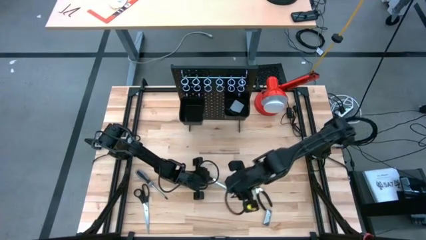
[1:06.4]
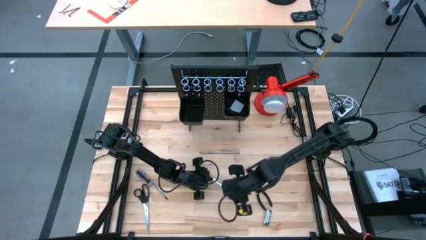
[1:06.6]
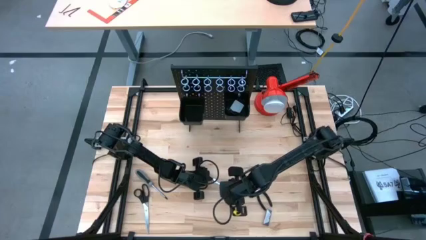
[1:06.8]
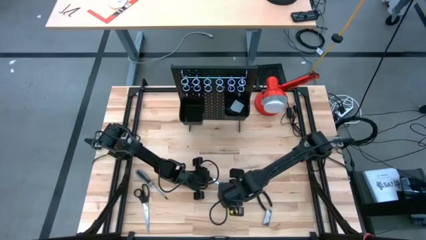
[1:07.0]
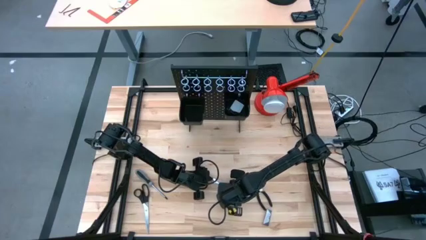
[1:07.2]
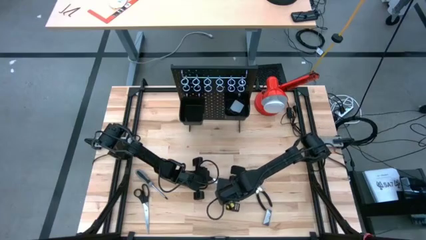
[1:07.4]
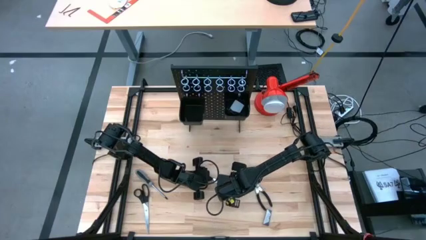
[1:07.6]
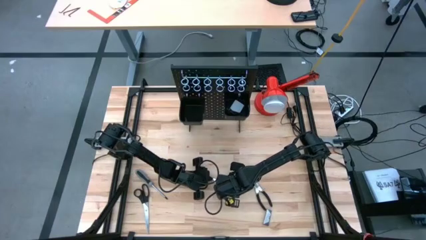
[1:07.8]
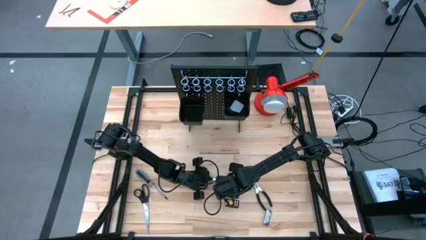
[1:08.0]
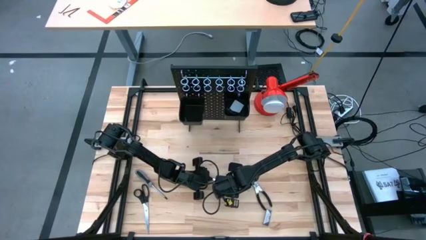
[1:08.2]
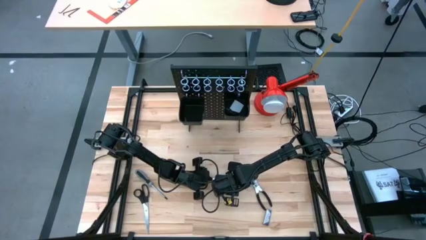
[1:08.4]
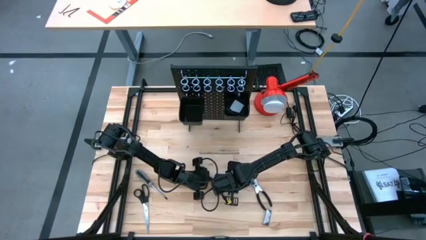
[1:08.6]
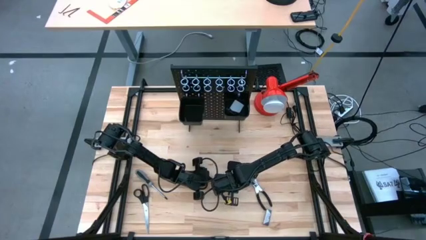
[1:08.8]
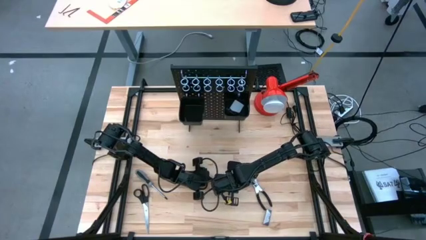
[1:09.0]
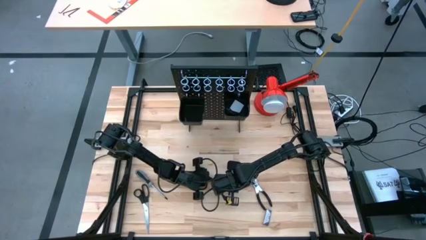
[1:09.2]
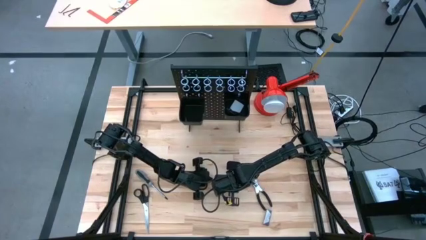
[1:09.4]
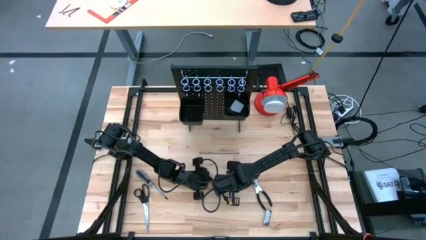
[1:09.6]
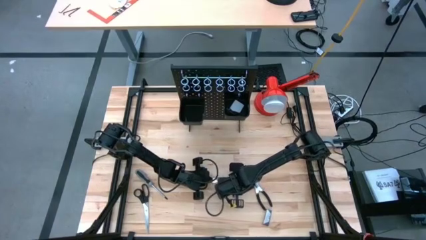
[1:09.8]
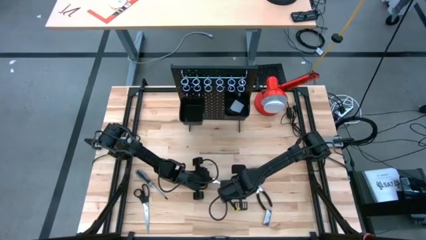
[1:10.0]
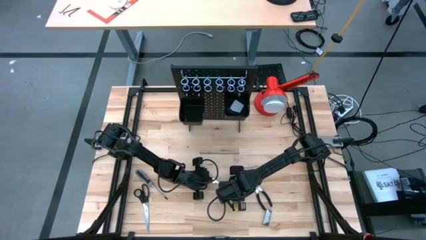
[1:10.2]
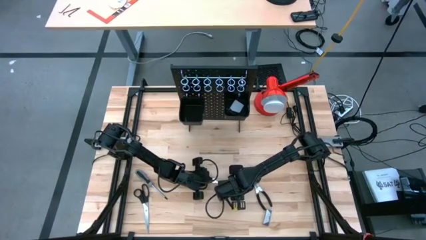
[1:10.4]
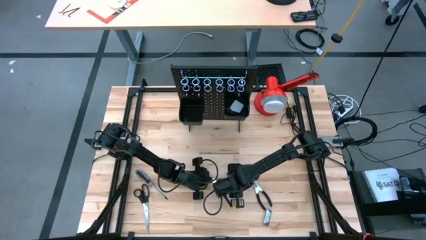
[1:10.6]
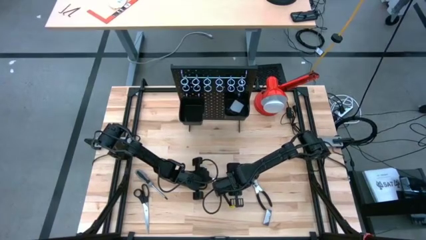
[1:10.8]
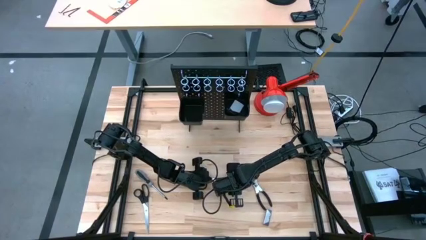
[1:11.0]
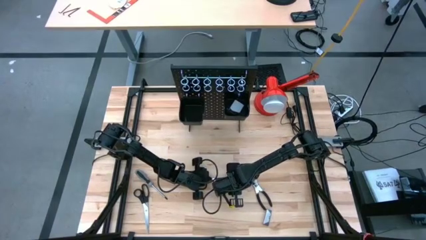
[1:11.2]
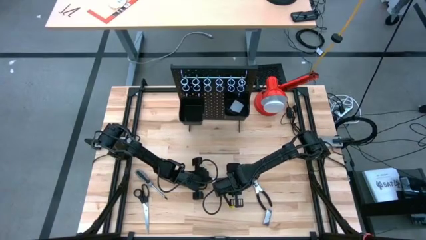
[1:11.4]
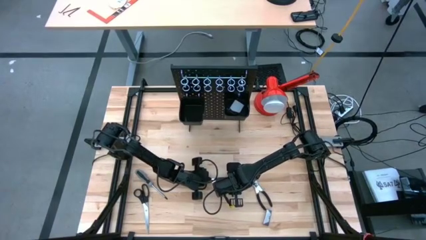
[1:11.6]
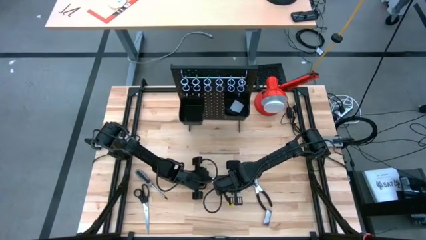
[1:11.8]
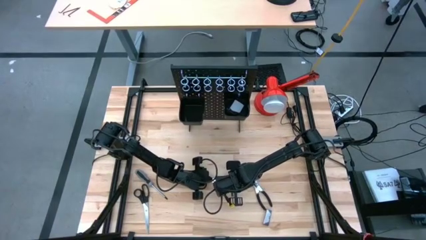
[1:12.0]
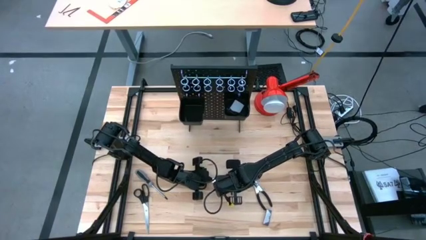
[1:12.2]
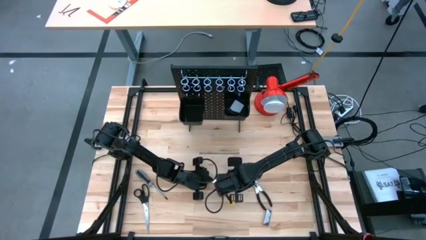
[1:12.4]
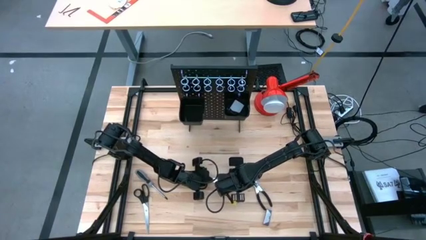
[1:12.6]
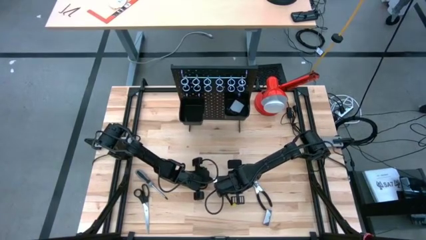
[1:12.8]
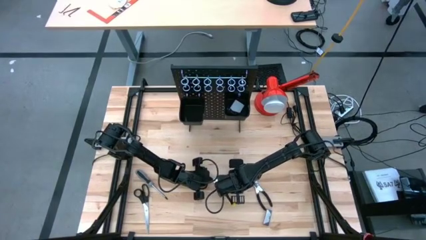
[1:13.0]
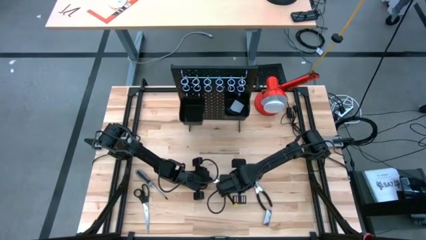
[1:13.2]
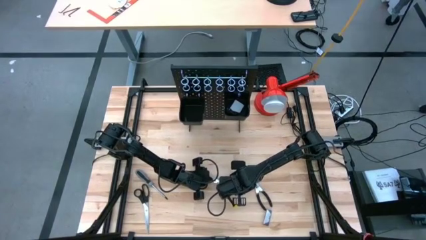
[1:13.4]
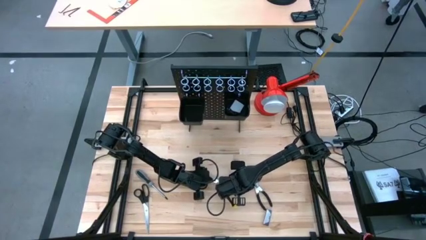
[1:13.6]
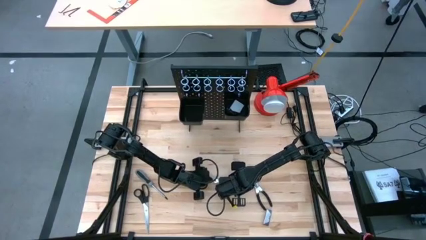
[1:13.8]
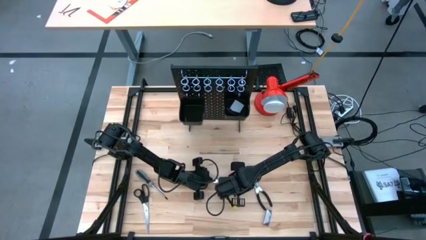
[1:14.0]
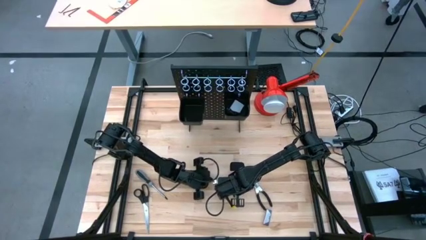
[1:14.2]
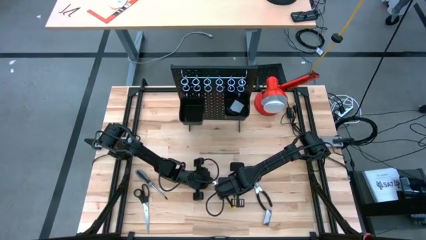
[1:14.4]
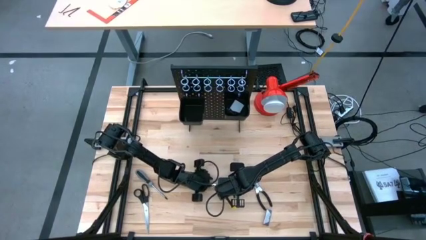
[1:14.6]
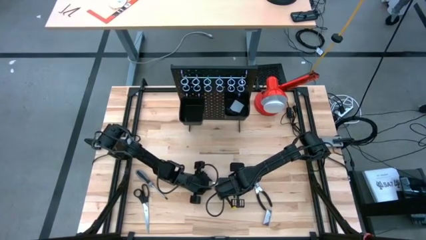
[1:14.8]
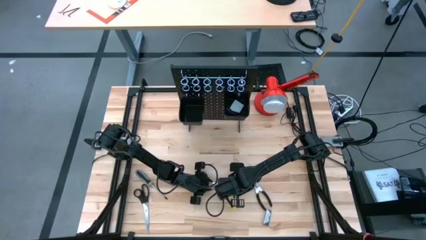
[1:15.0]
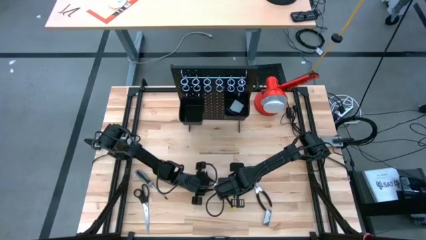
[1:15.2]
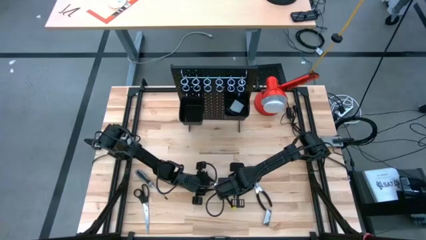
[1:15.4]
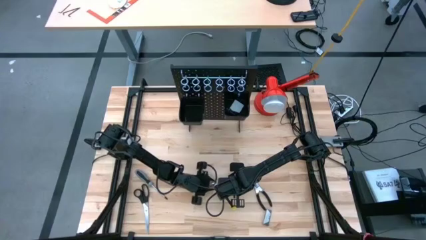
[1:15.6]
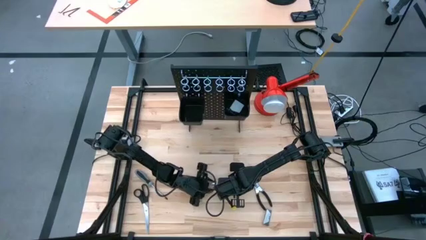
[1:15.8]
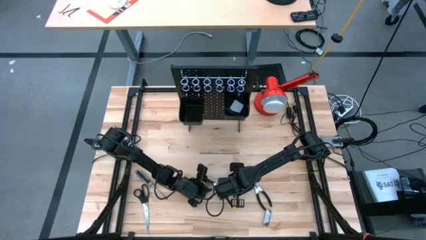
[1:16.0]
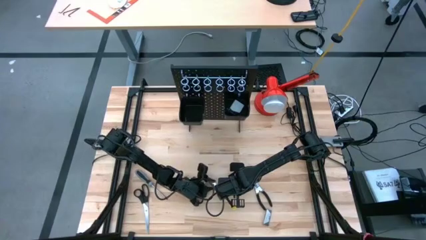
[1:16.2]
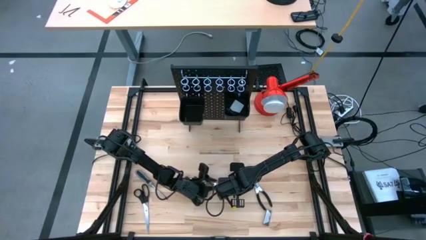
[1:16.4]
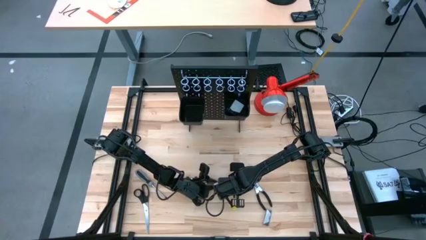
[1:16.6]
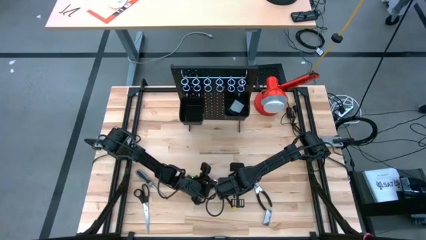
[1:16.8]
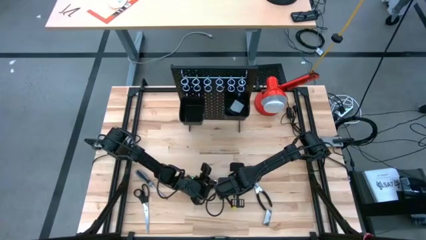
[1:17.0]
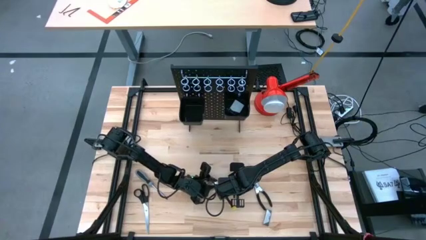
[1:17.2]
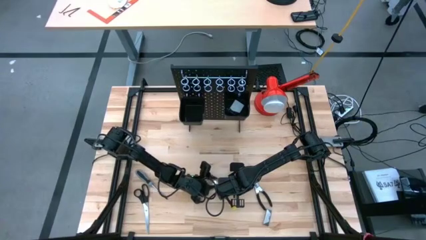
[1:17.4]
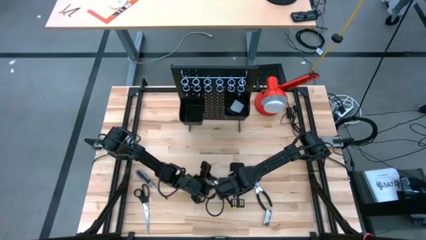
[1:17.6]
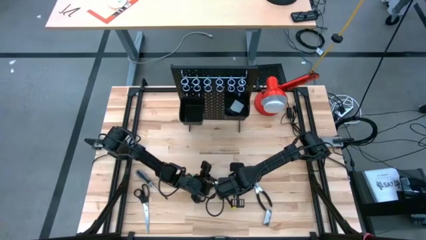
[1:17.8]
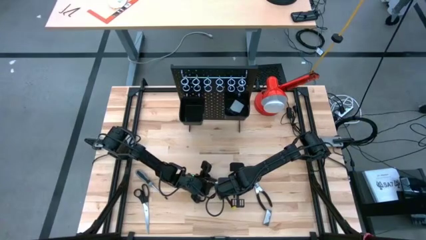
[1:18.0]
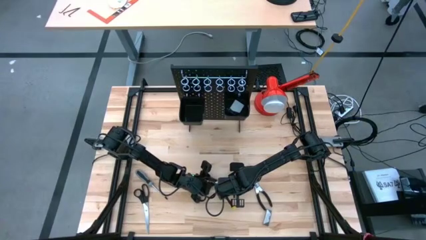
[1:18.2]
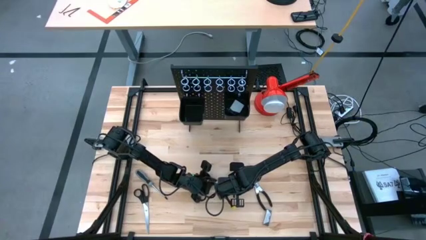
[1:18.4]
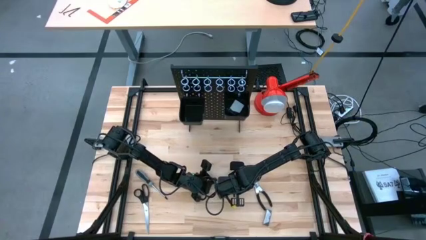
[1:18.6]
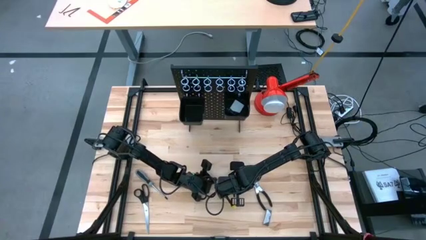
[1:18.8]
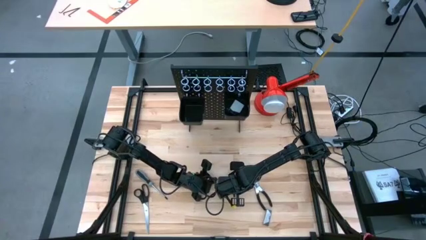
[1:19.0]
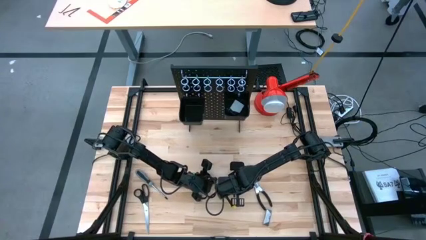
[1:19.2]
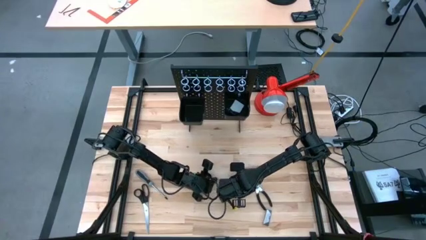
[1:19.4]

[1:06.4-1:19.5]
Task: Hang tools onto peg board
Hang the wrench on the pegboard

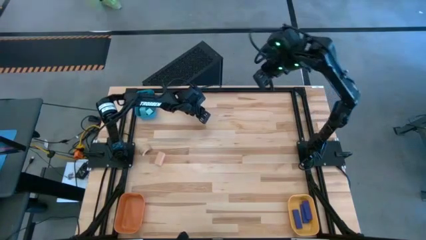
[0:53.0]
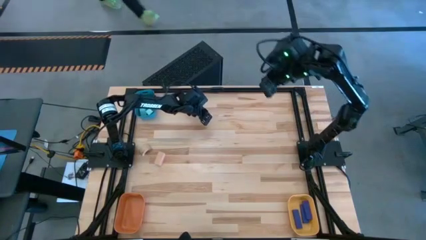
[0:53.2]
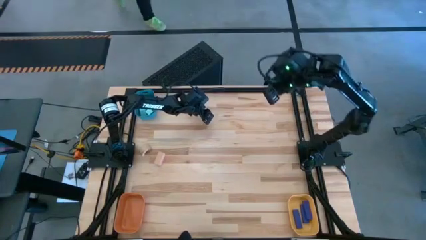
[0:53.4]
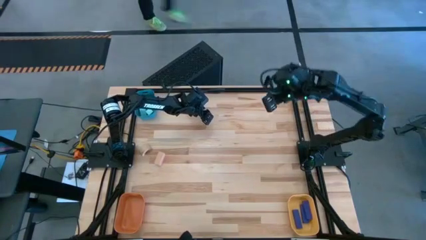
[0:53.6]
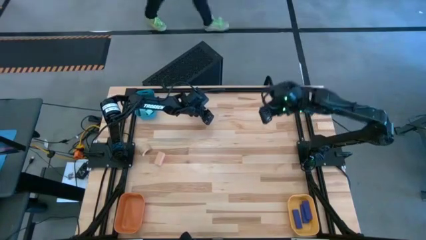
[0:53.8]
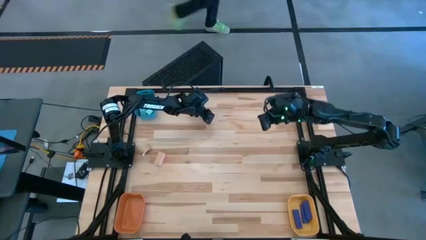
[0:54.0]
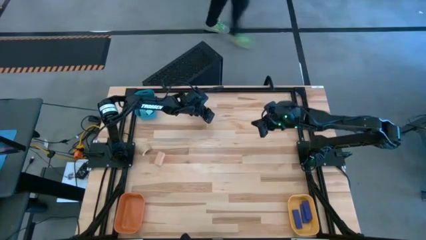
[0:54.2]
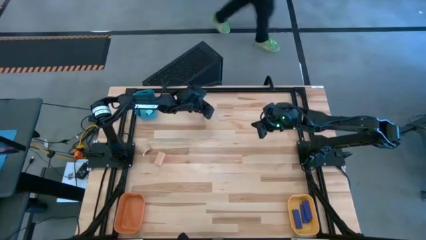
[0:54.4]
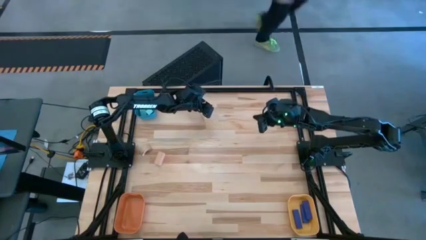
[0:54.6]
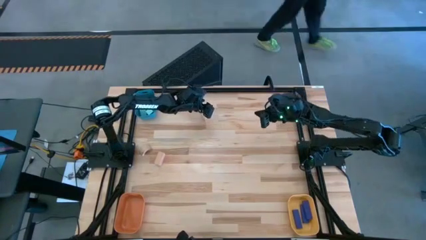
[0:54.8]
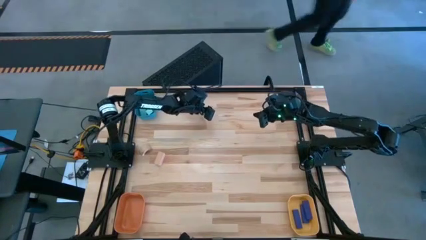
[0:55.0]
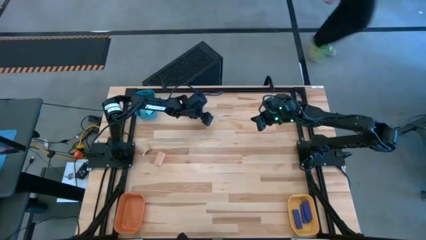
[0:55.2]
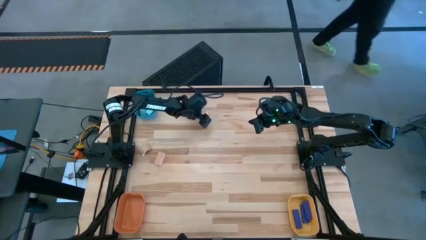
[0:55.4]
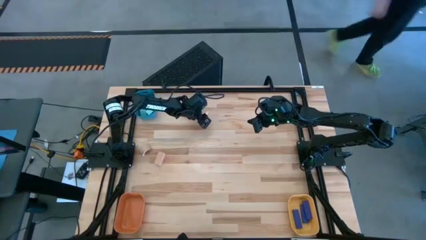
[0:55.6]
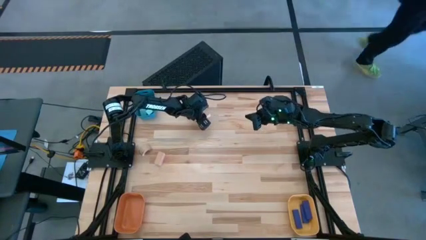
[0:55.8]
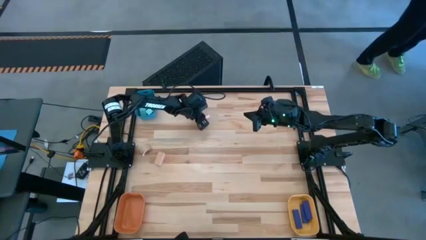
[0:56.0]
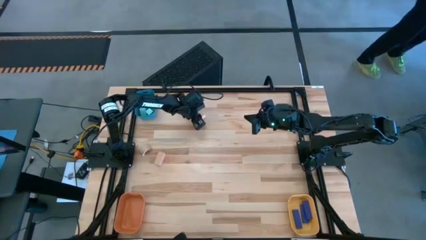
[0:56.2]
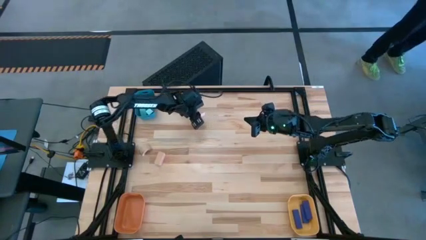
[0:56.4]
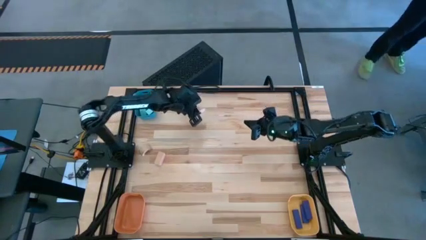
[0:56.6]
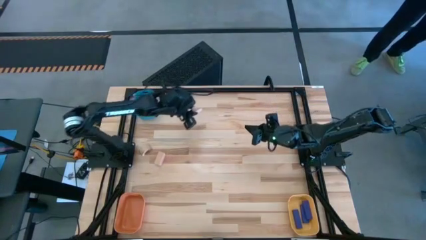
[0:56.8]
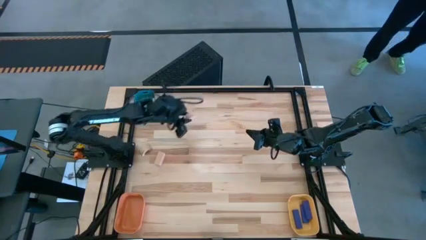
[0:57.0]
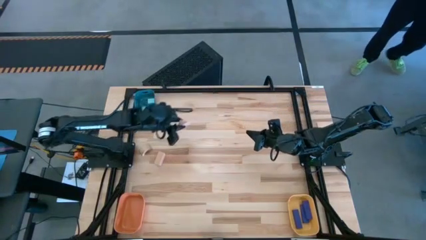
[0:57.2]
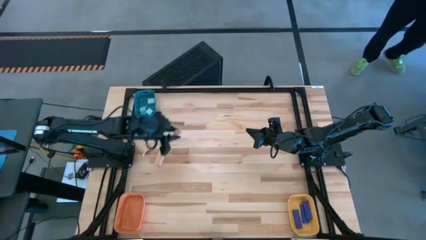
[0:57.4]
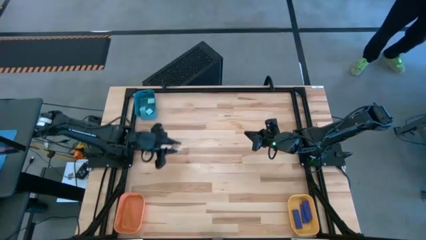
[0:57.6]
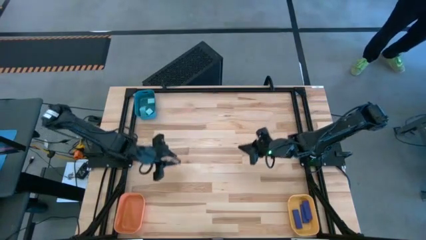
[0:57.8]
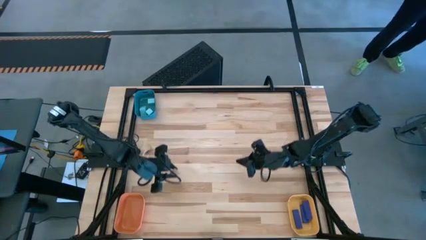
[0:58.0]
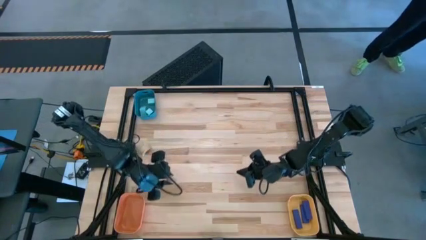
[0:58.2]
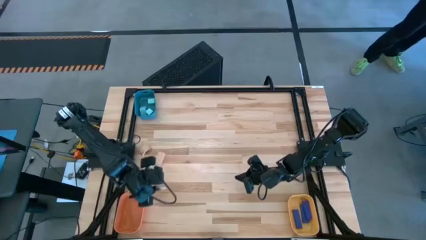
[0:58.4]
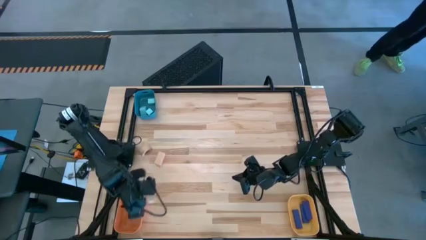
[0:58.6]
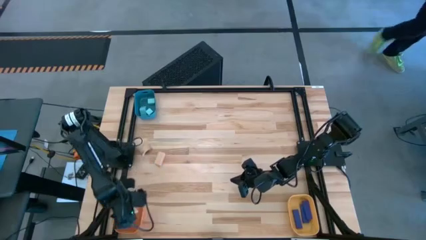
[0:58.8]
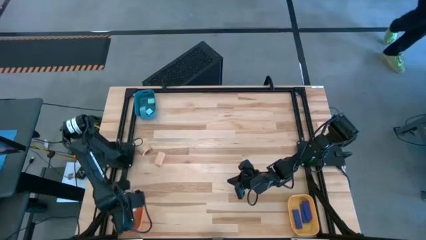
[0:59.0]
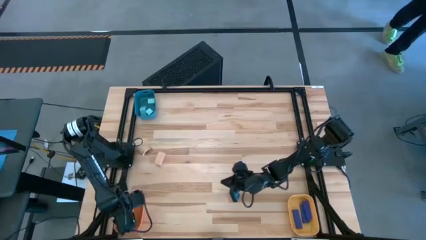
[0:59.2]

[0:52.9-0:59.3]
Task: Sort & place blocks by color
Put the top brown block into the orange bin
